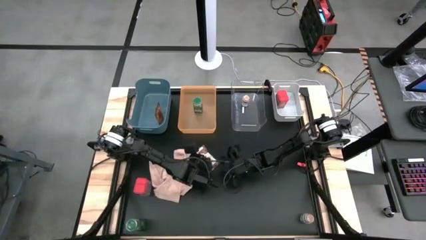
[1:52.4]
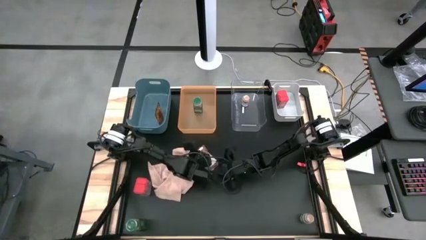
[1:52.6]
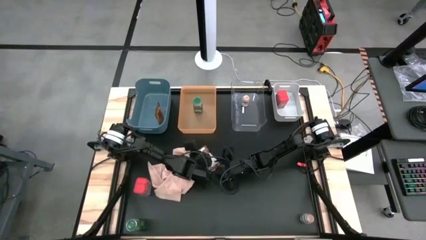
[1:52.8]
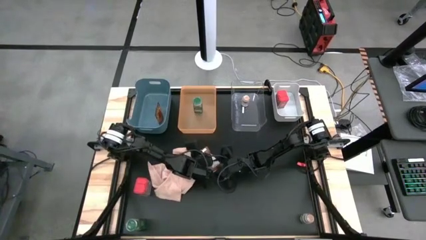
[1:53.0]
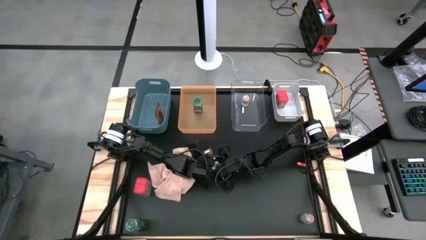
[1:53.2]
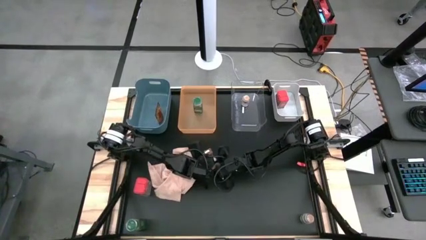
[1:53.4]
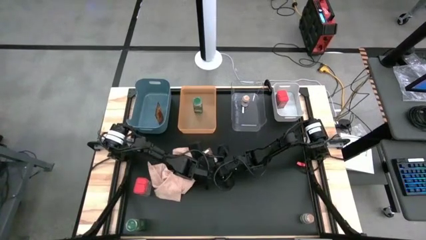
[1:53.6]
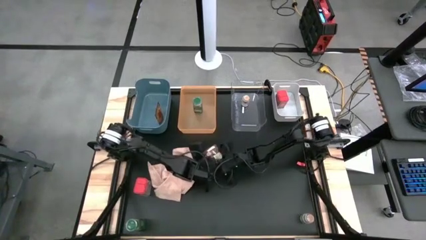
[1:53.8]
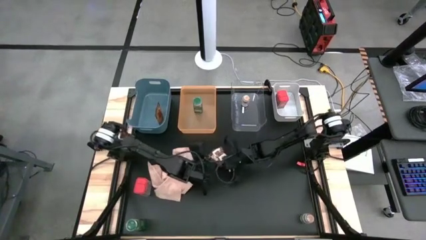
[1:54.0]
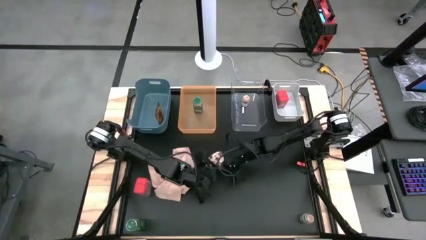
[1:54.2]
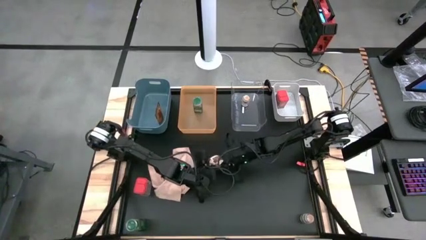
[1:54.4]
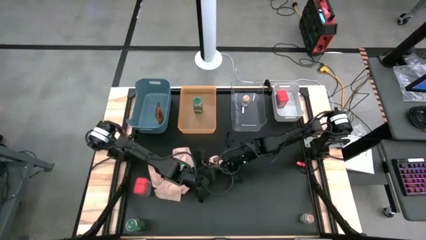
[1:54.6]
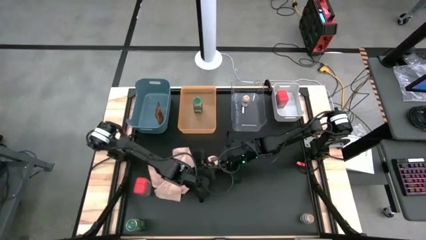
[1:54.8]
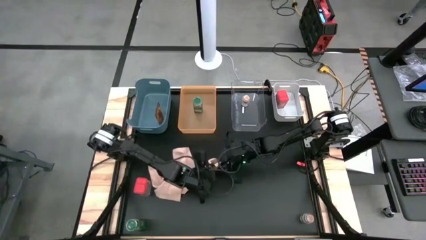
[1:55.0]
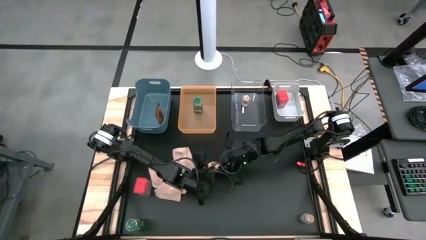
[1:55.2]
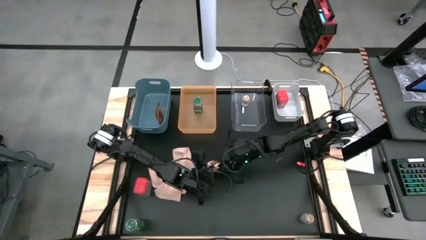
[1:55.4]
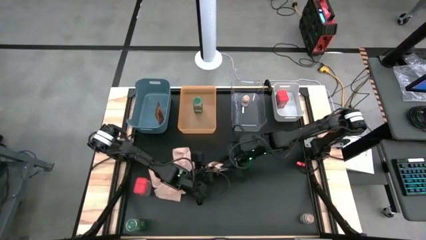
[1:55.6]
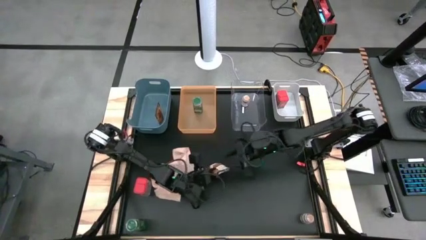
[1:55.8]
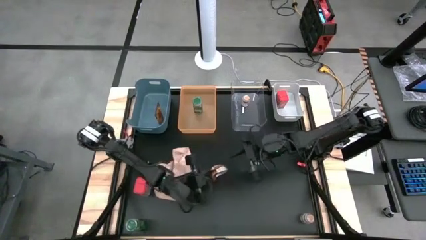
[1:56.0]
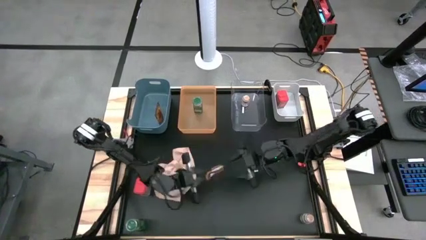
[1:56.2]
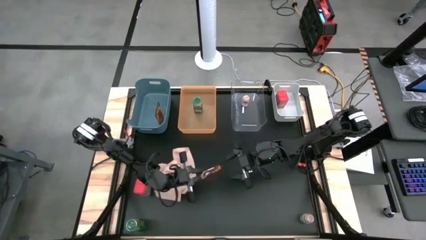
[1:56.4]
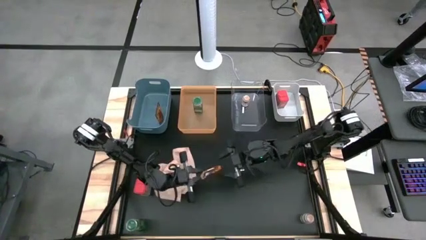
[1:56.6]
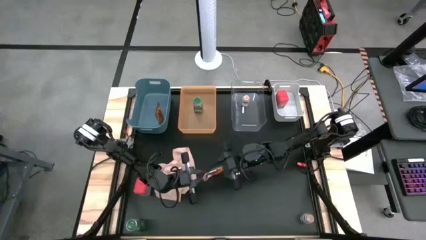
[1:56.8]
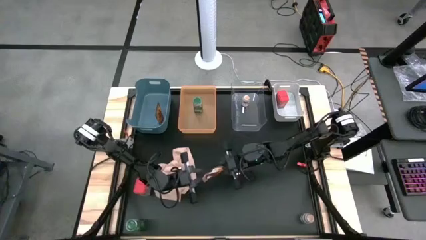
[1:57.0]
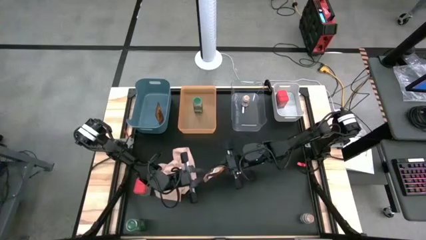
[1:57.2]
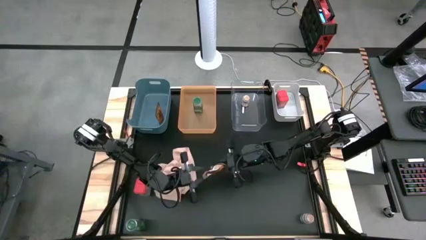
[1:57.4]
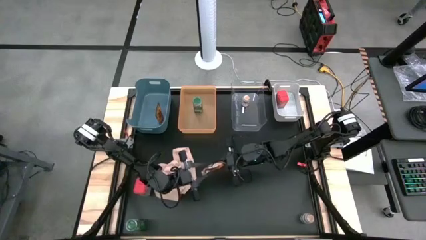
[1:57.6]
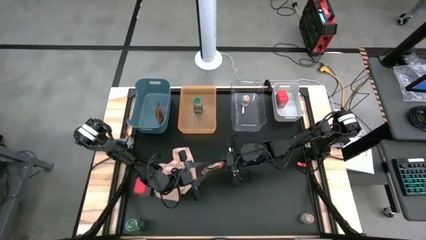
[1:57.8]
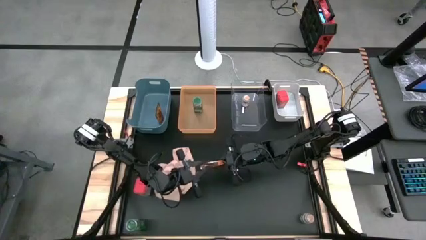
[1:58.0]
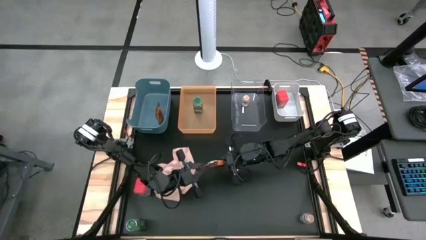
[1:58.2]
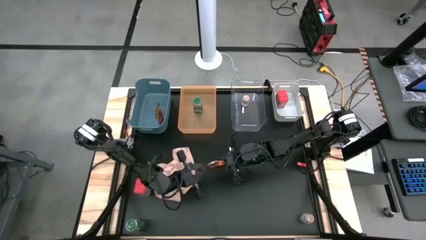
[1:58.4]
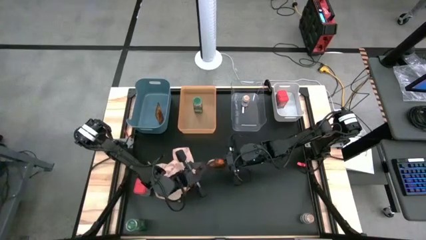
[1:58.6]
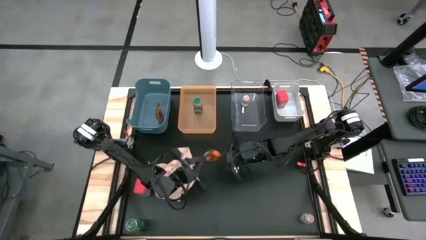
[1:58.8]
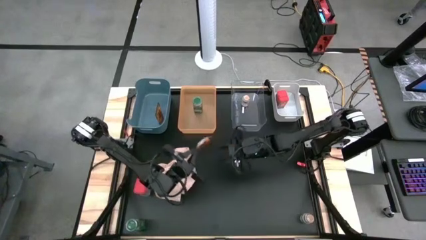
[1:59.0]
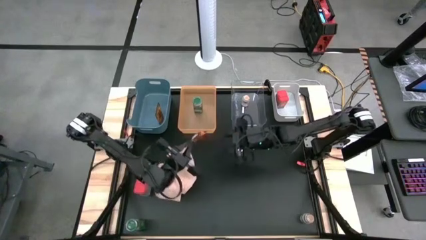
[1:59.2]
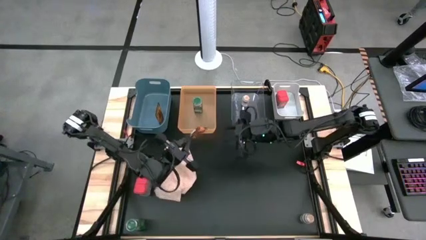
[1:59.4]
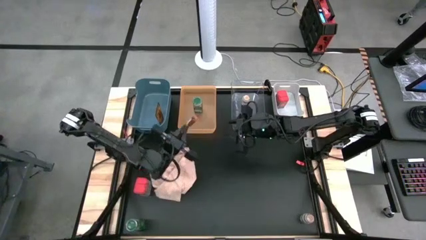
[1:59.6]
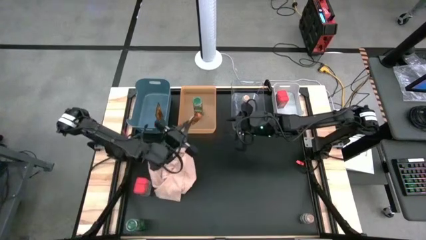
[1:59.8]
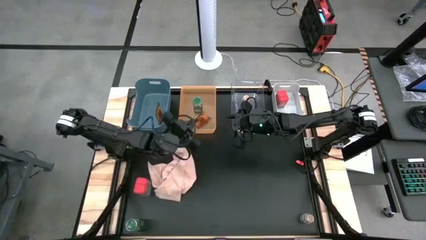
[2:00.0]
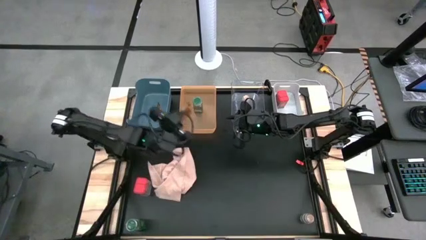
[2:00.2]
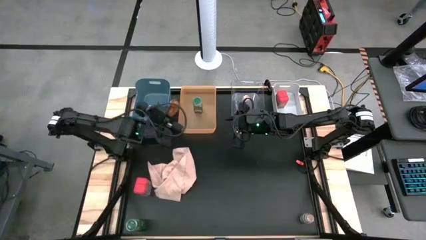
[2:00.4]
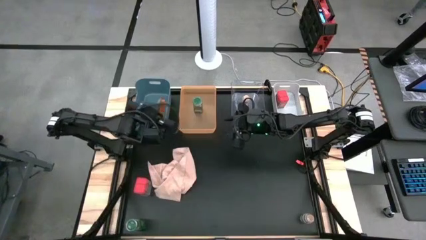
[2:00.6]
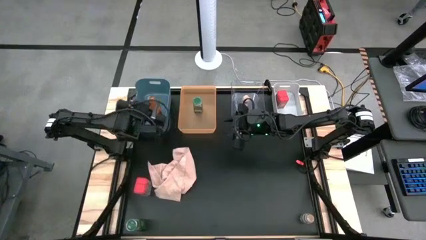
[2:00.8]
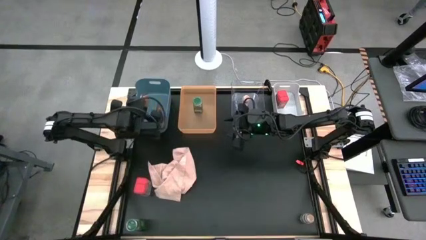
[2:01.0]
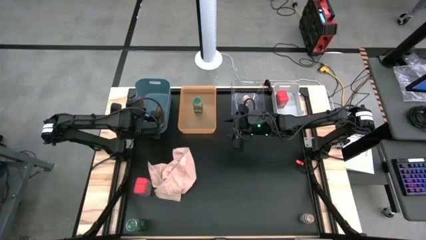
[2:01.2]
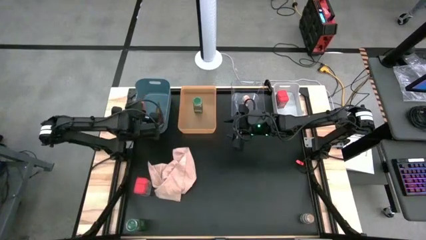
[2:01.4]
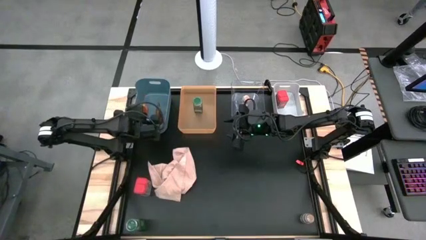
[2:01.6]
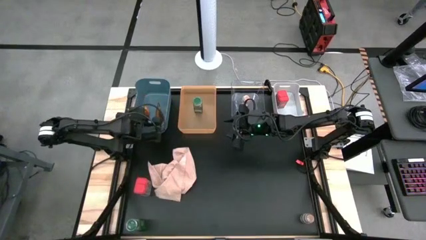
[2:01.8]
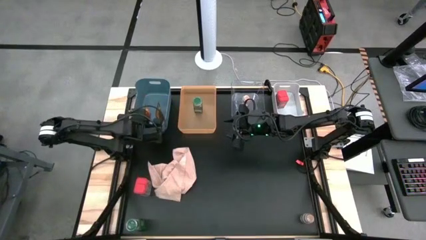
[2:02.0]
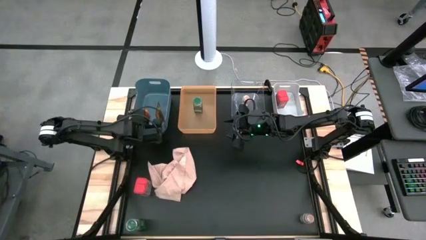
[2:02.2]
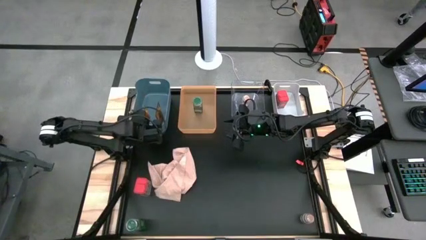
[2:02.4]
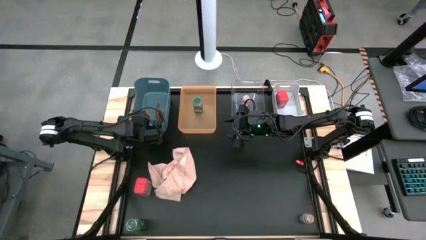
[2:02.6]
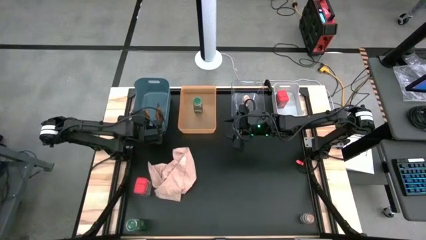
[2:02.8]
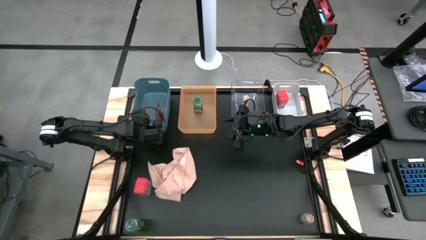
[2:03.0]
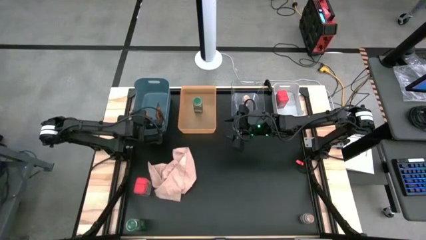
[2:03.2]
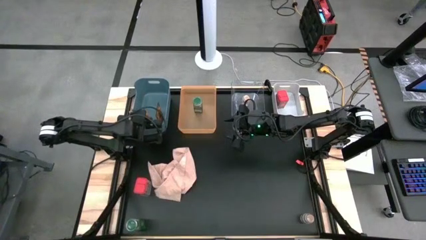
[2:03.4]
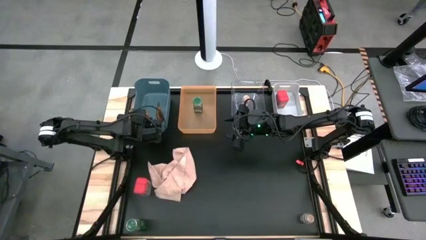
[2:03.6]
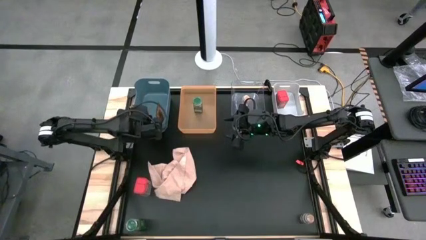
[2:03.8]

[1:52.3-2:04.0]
Task: Sort spices by type
Put the orange seasoning pack into the blue bin

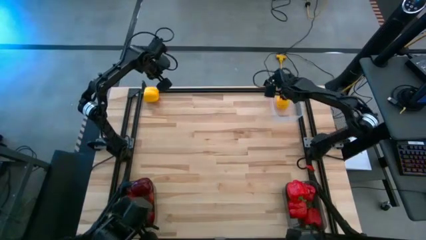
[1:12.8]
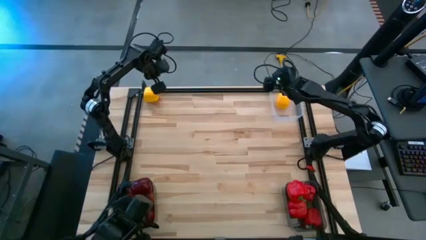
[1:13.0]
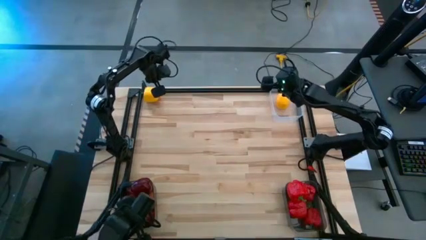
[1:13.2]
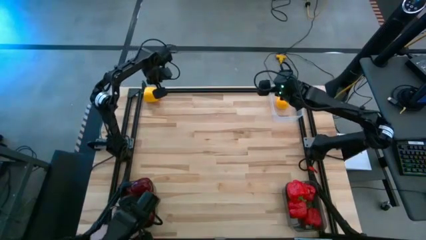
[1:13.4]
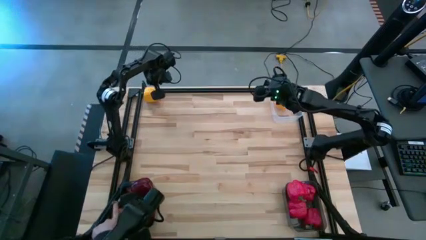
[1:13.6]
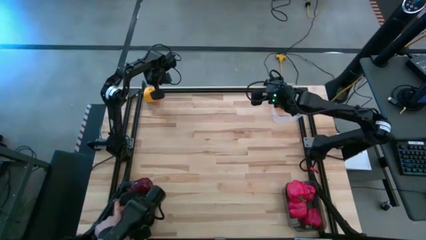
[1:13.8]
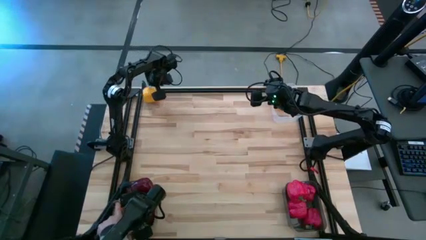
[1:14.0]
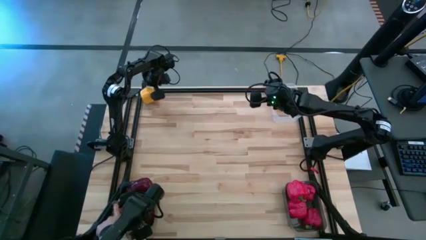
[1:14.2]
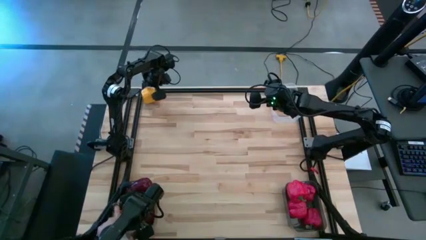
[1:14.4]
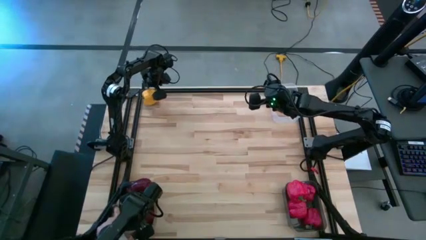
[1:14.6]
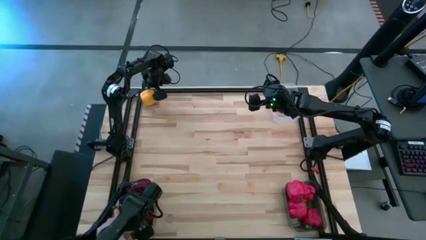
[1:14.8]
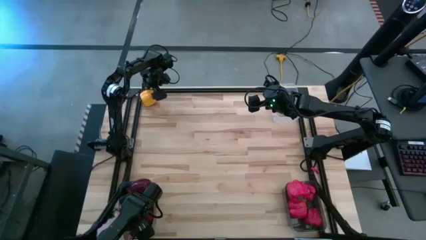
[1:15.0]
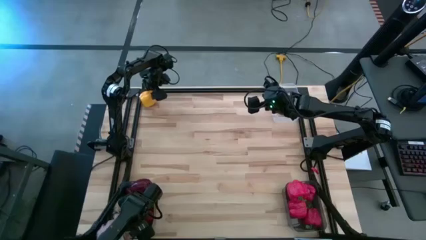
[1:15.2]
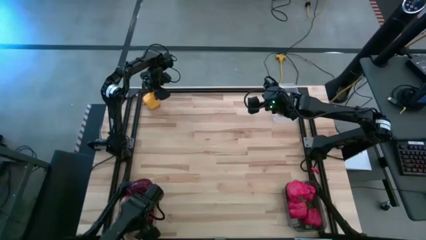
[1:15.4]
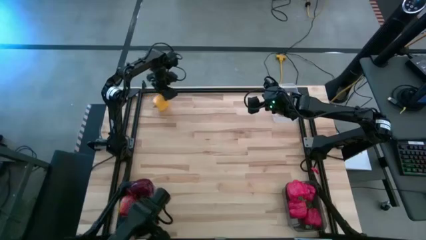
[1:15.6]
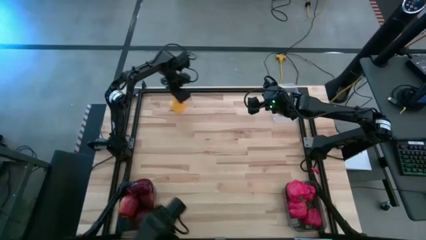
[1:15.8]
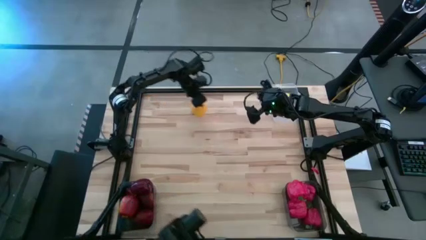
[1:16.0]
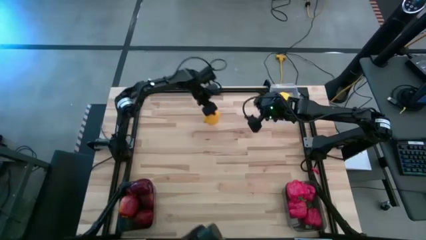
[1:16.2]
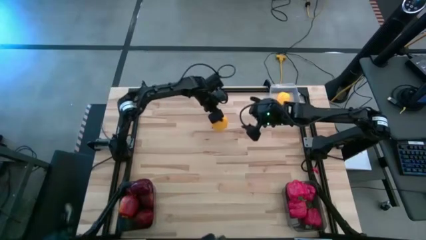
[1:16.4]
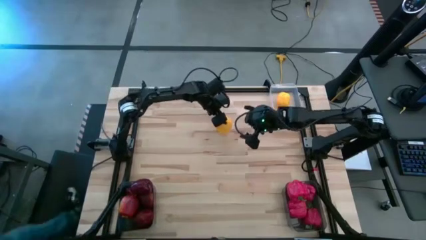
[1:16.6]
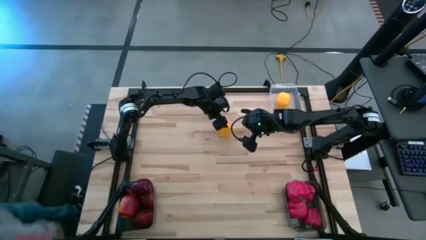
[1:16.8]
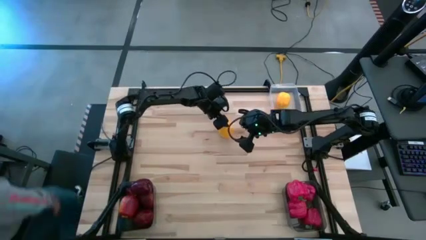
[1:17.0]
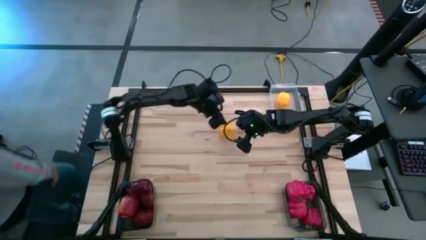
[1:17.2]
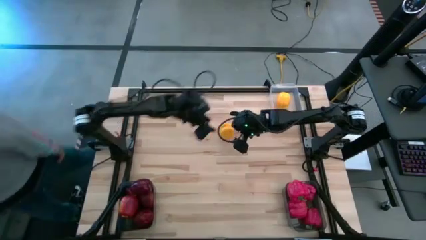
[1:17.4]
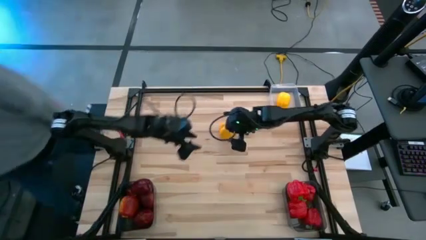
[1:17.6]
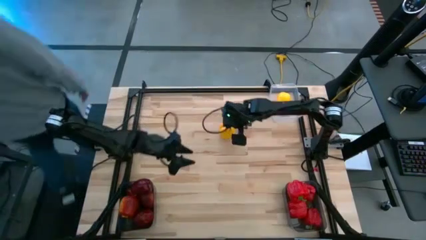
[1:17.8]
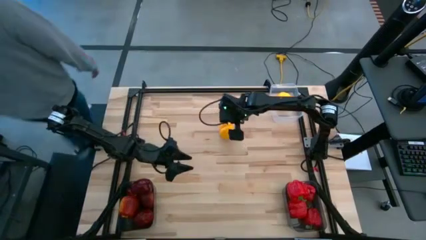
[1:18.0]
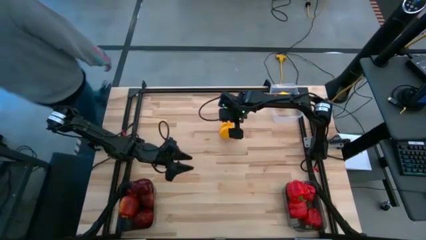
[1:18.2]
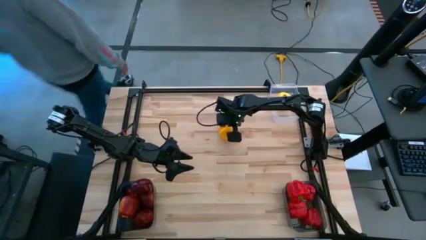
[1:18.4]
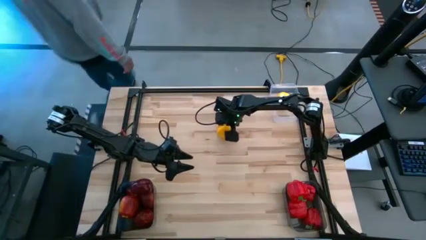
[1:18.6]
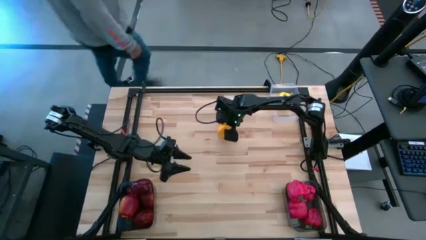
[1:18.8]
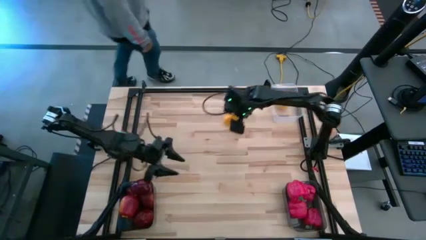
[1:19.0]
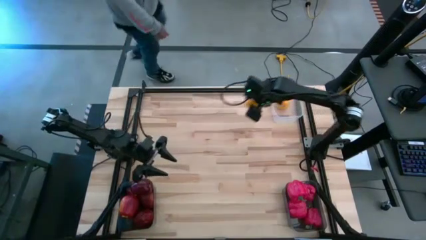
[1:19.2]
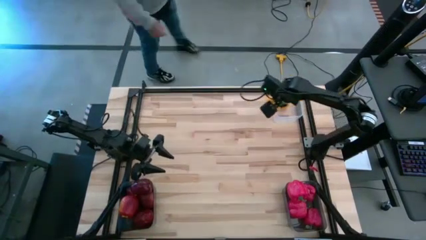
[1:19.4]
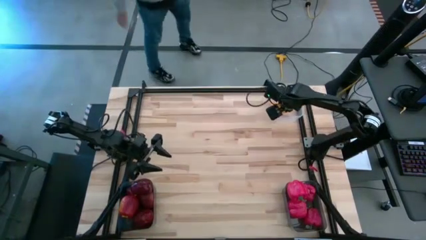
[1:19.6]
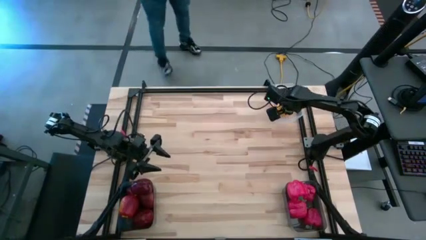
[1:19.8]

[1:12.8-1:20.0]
Task: Sort produce into baskets
Put the yellow bell pepper into the transparent bin
